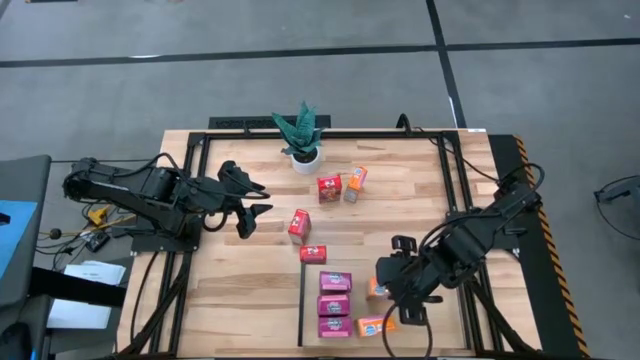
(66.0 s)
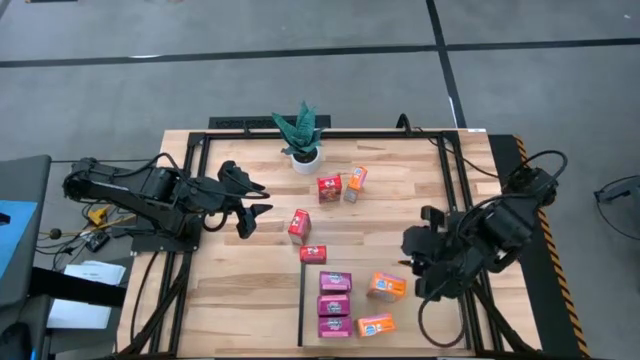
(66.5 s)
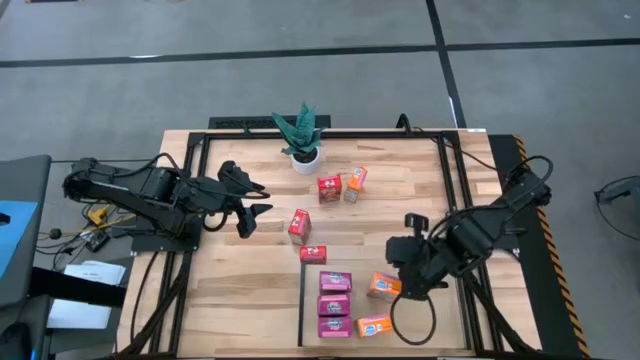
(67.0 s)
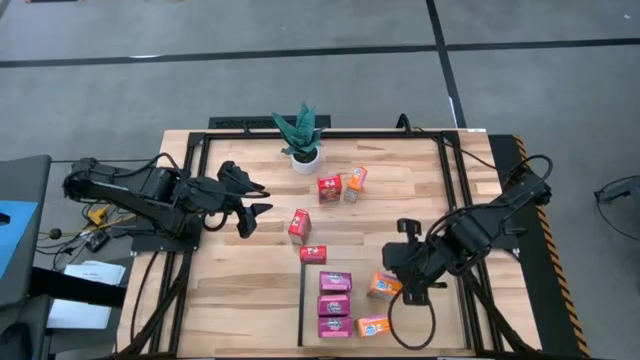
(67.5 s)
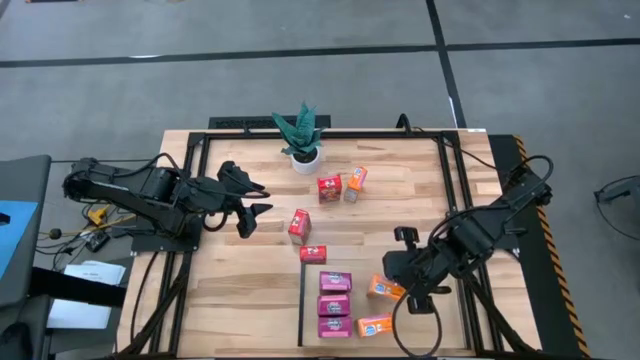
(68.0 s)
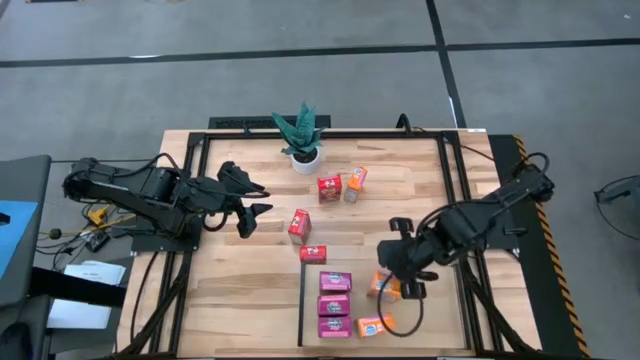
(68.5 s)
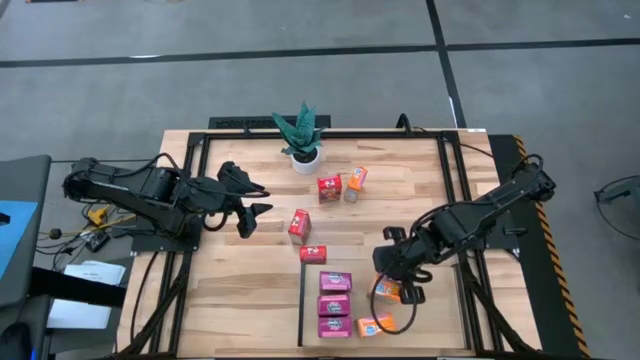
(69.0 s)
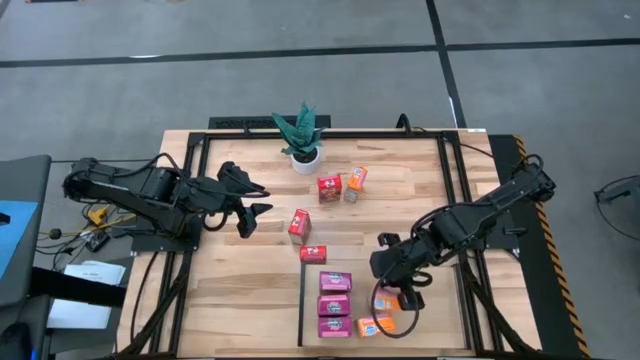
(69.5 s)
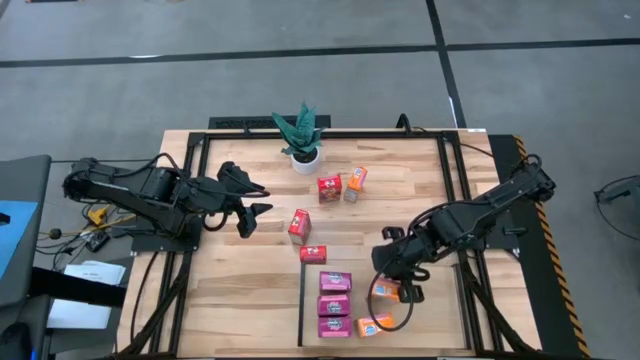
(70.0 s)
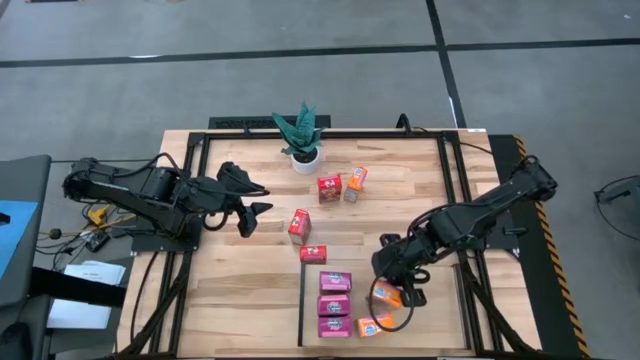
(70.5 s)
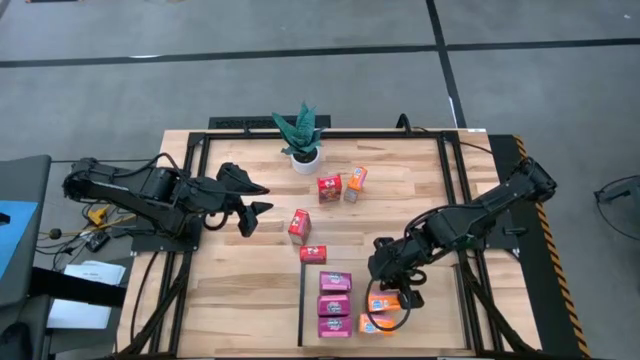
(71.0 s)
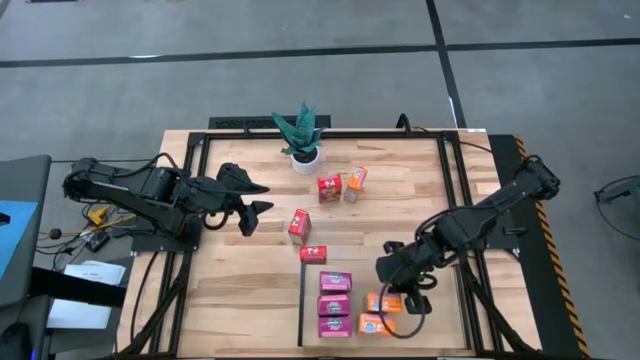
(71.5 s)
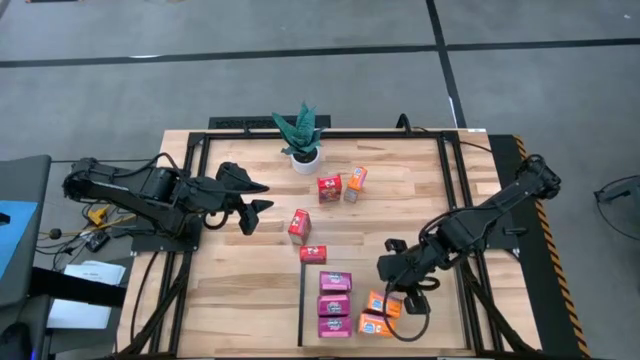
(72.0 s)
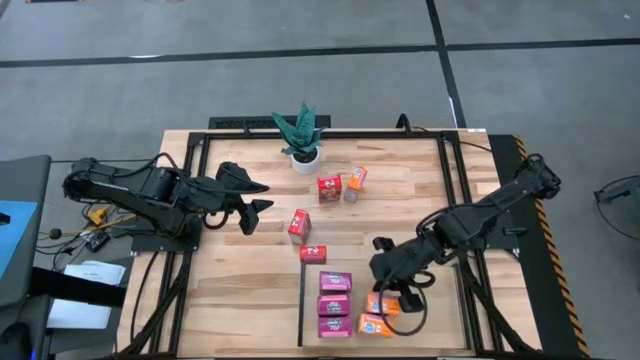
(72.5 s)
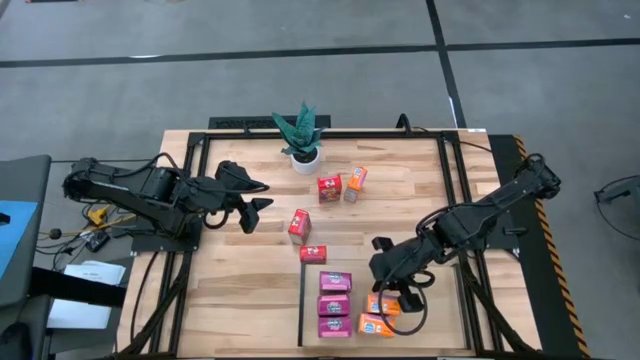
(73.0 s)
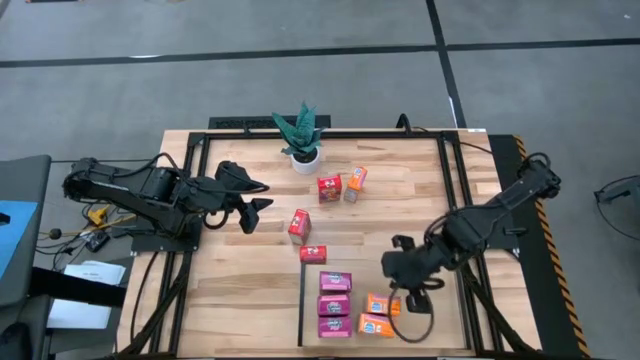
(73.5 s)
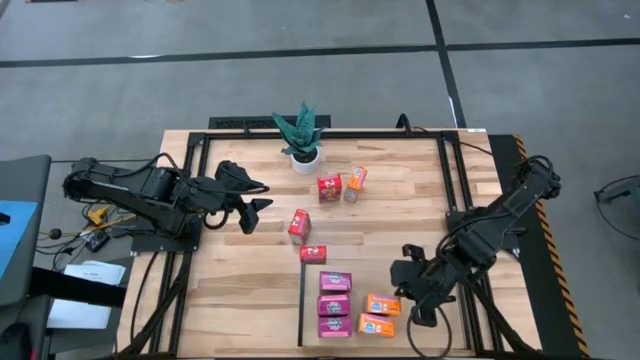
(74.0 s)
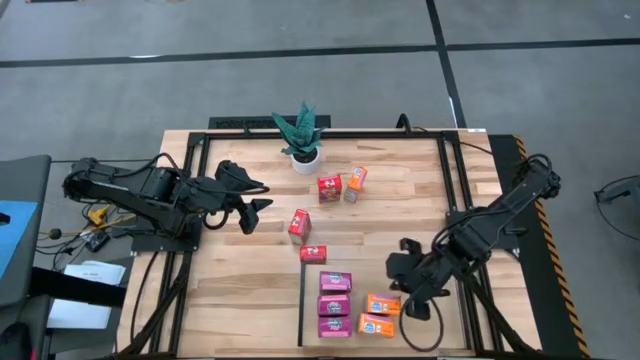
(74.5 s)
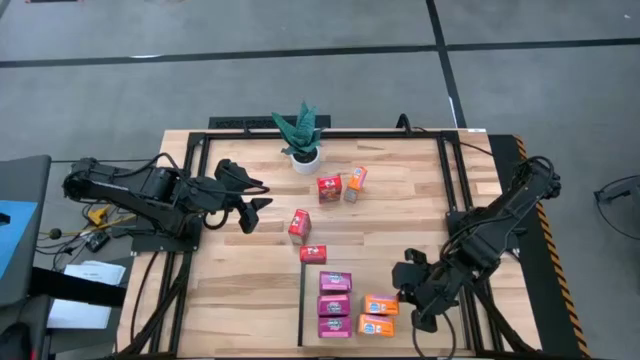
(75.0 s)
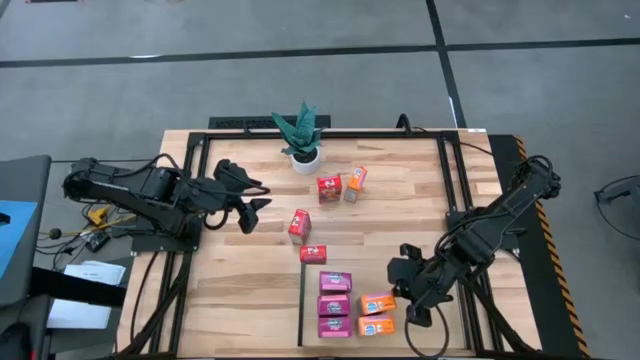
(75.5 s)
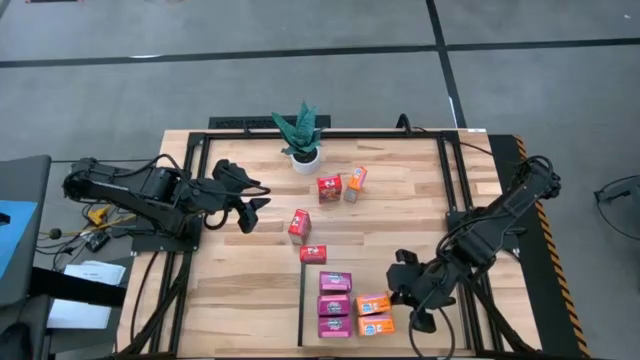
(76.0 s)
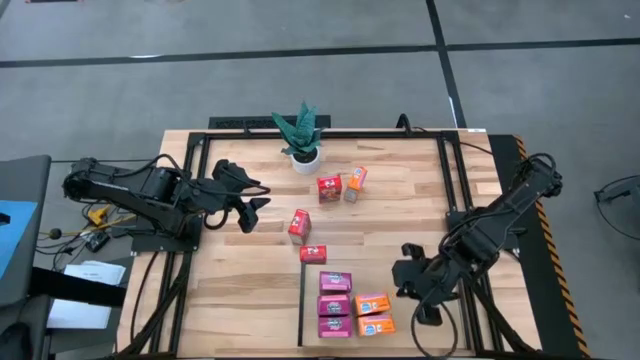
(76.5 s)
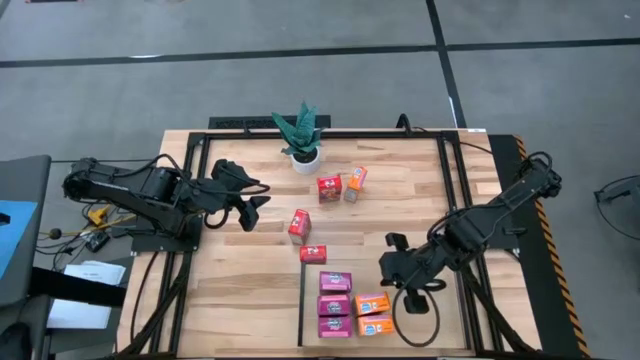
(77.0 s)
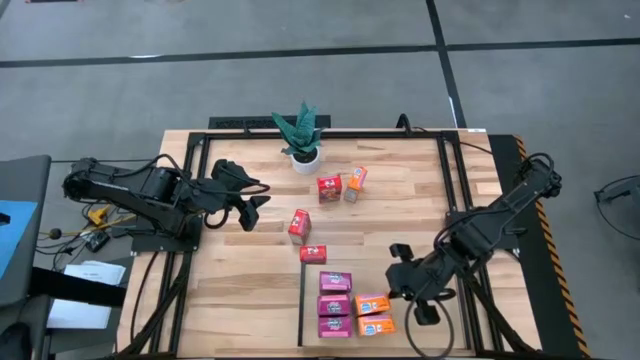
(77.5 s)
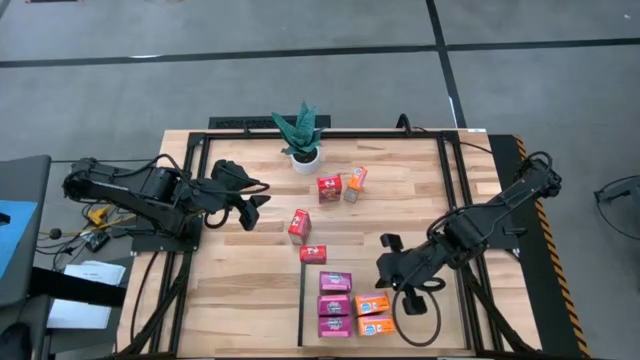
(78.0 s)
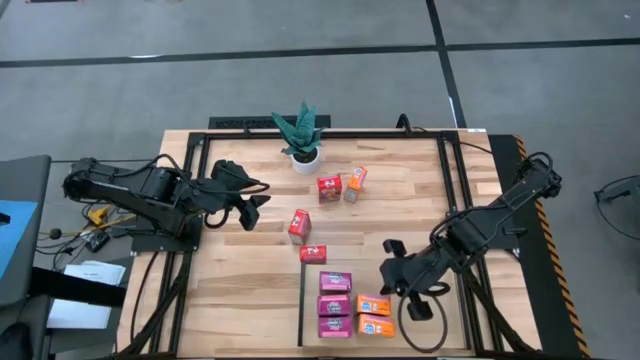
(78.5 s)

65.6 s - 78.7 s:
Task: Stack cereal on shelf
Put the orange cereal box on the shelf

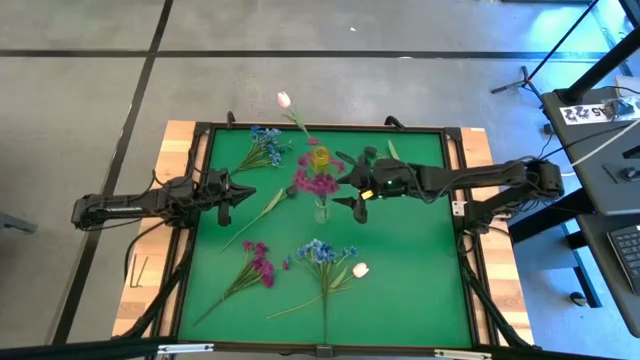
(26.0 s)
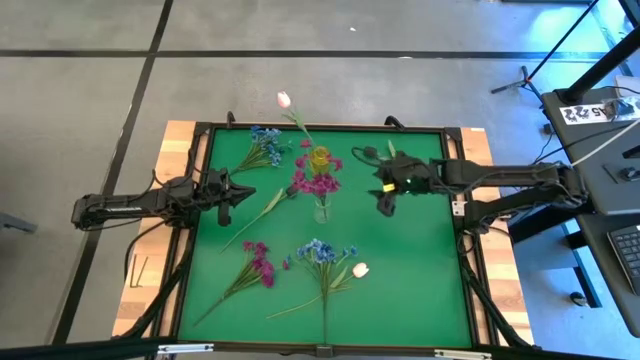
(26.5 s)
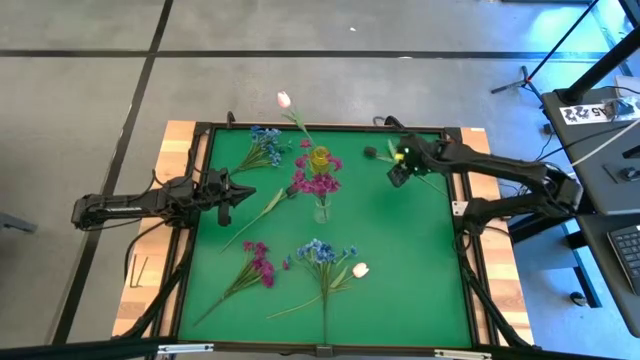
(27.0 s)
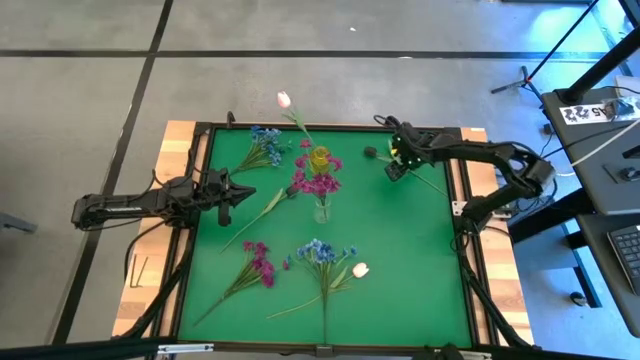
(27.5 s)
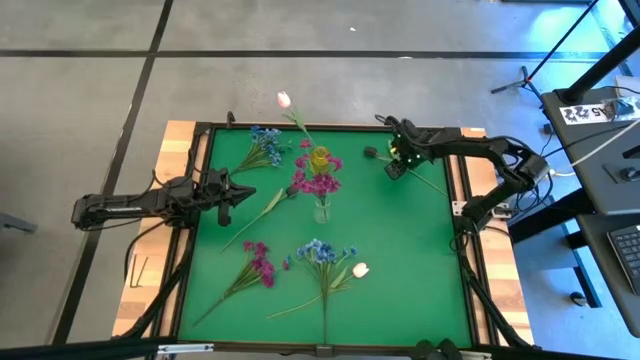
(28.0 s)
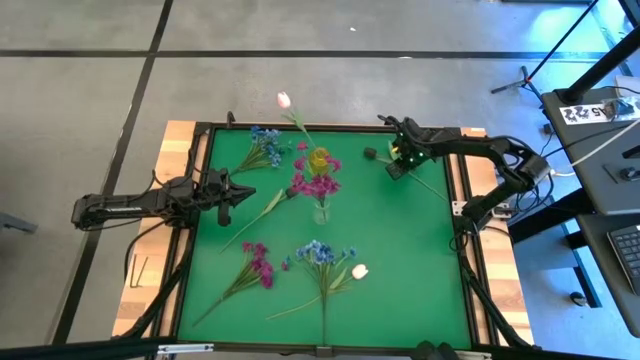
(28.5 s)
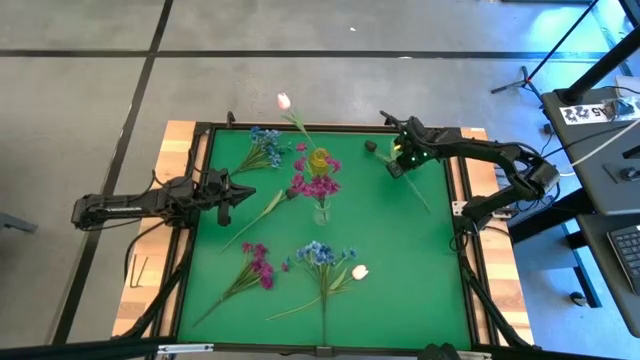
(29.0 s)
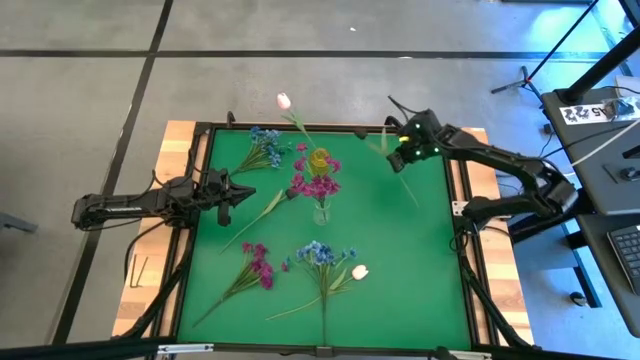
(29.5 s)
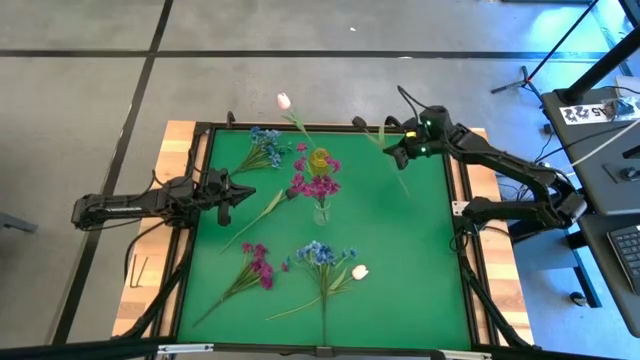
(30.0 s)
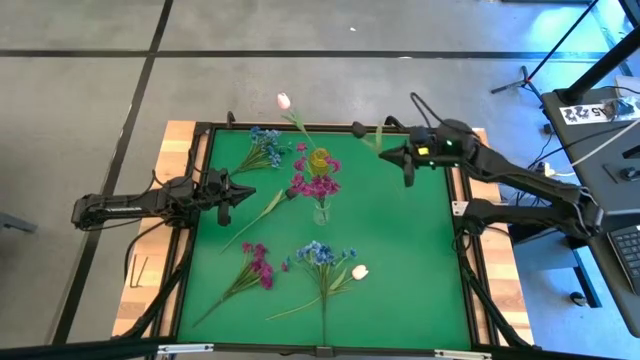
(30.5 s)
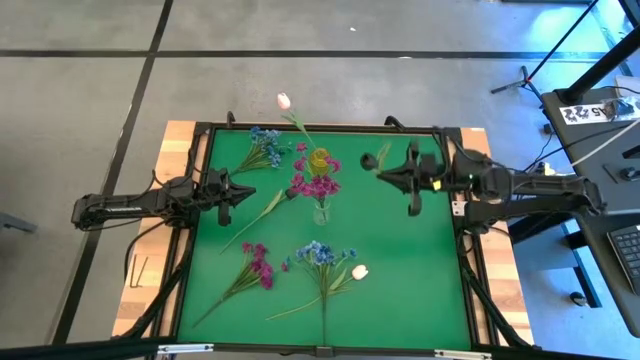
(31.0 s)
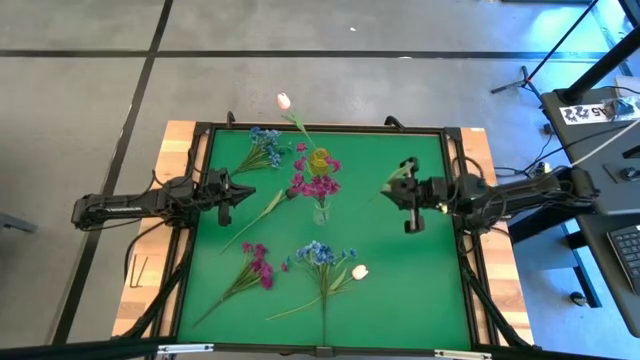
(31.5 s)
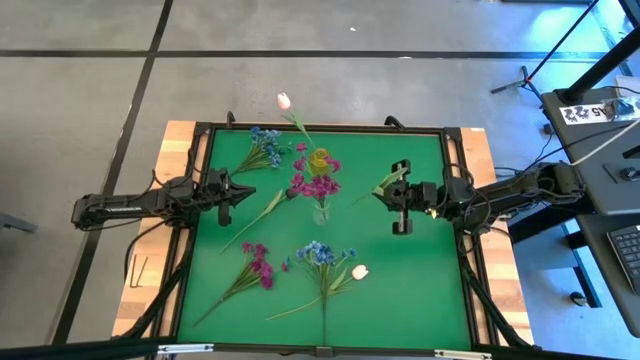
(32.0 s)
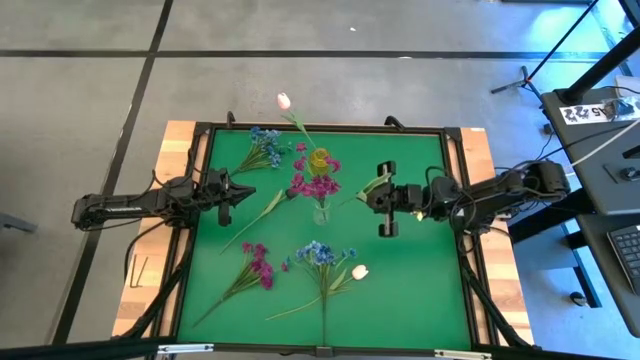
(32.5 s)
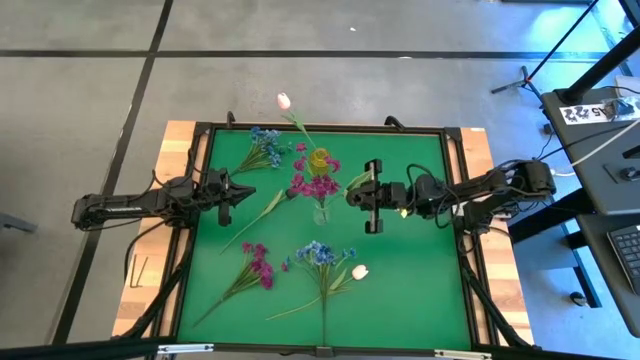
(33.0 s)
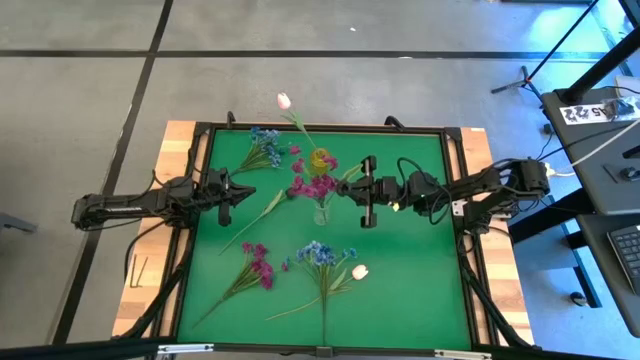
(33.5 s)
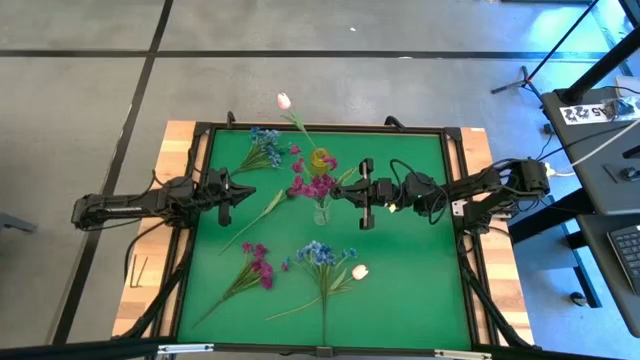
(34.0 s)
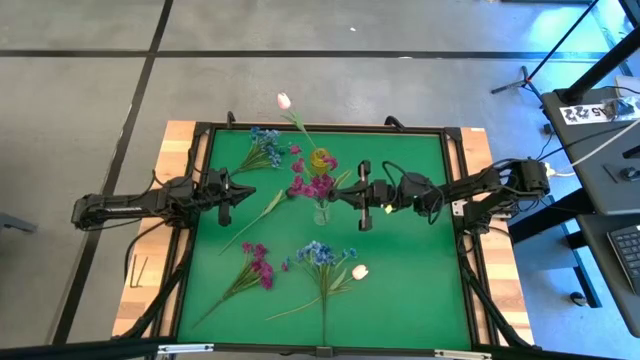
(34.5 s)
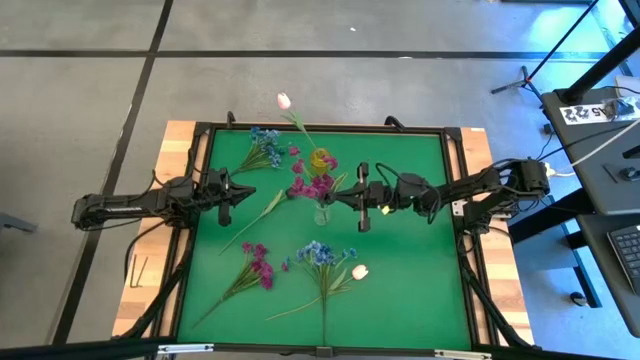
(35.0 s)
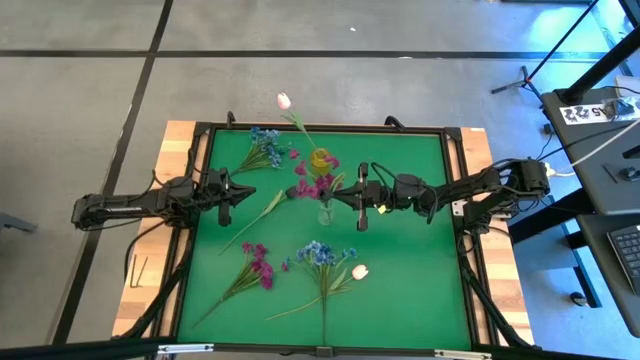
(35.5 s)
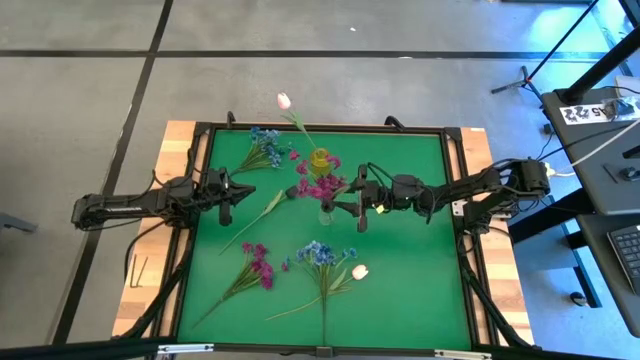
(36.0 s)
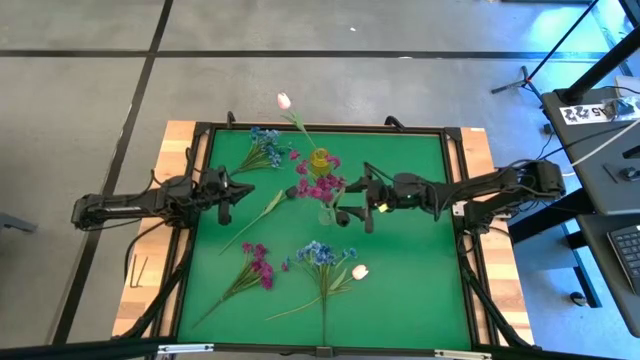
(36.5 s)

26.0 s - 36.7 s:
Task: Sort flowers into vase by color
Put the right black tulip into transparent vase
